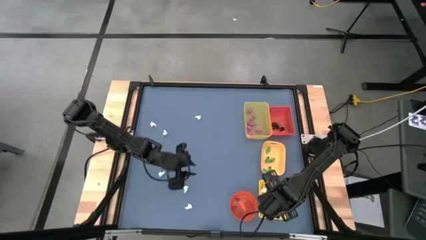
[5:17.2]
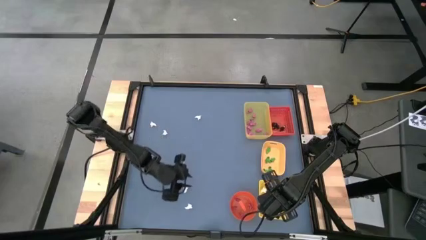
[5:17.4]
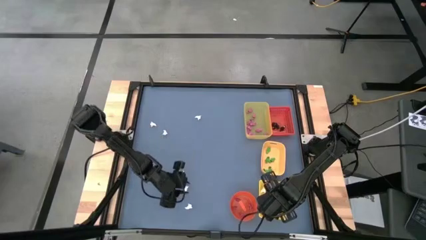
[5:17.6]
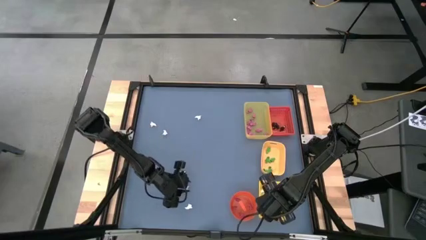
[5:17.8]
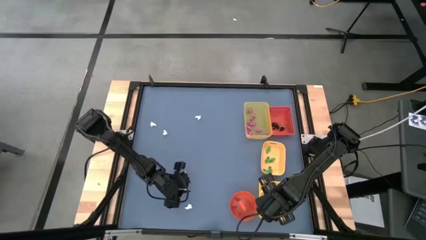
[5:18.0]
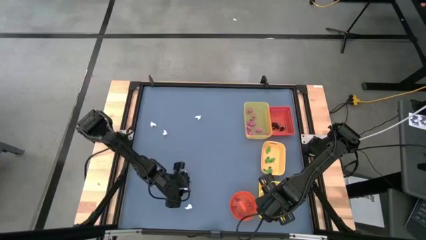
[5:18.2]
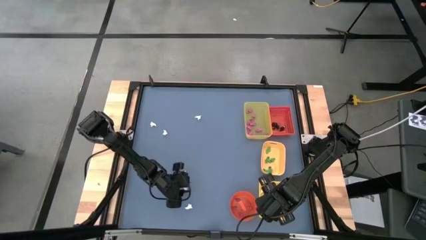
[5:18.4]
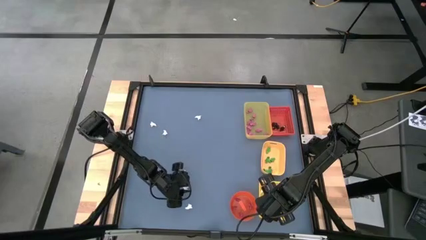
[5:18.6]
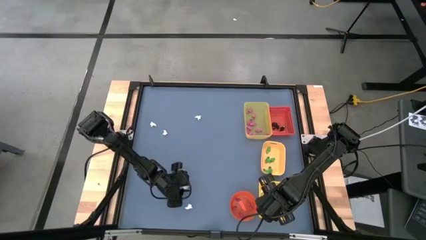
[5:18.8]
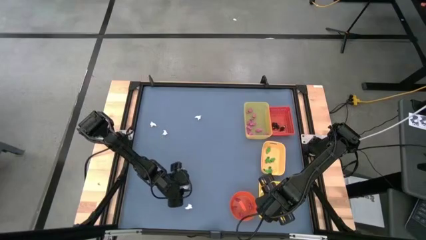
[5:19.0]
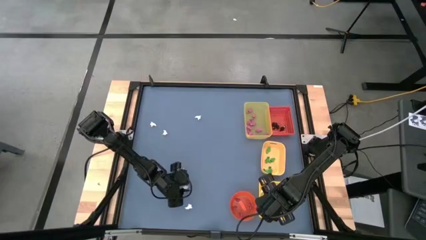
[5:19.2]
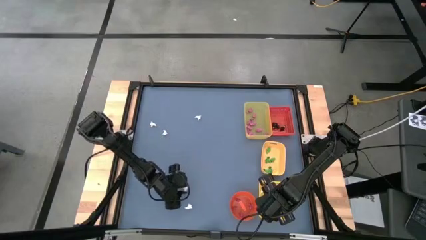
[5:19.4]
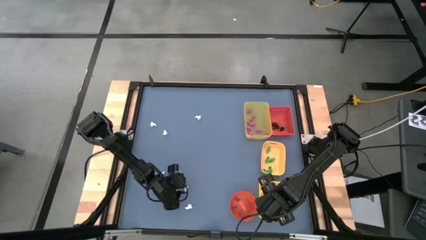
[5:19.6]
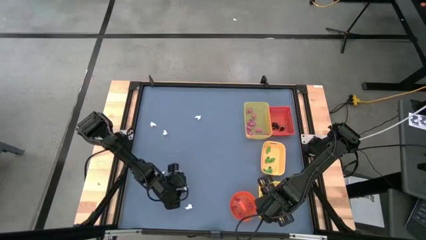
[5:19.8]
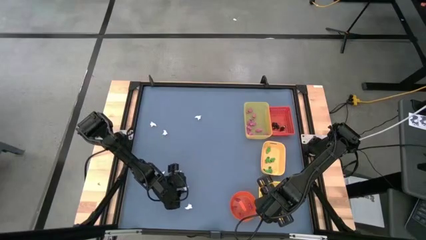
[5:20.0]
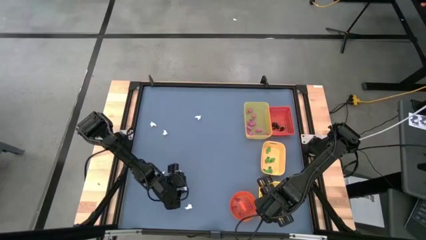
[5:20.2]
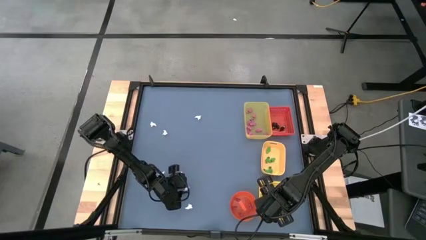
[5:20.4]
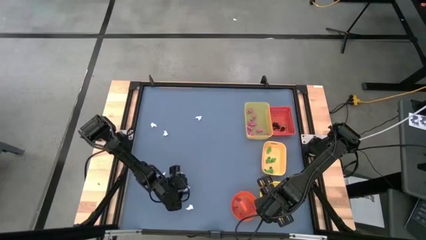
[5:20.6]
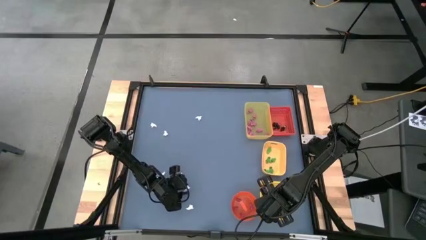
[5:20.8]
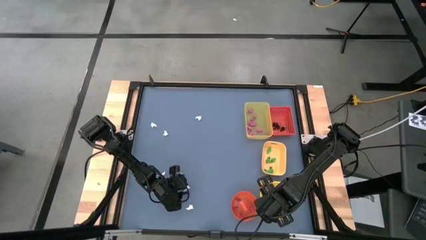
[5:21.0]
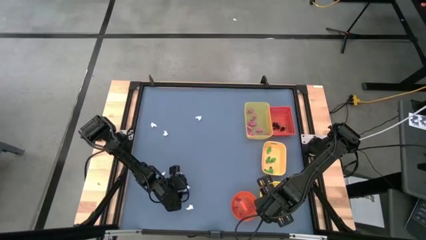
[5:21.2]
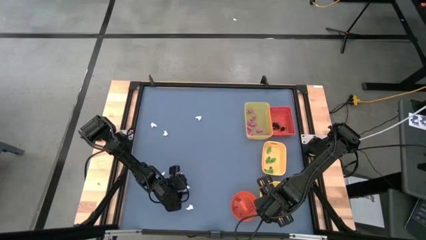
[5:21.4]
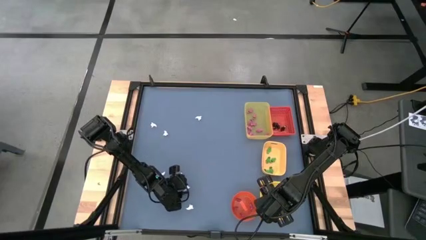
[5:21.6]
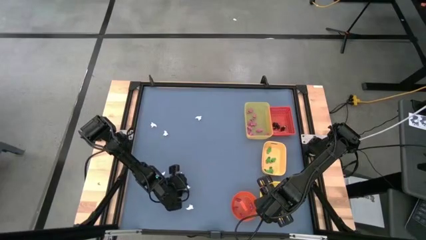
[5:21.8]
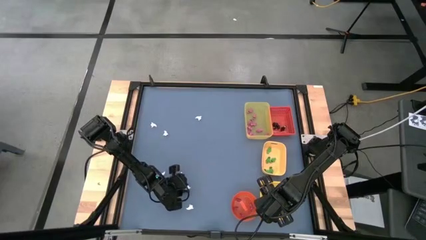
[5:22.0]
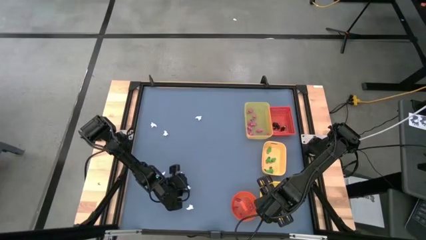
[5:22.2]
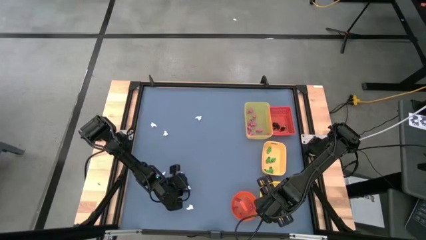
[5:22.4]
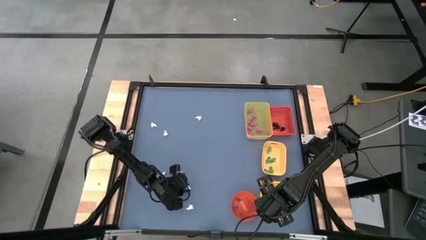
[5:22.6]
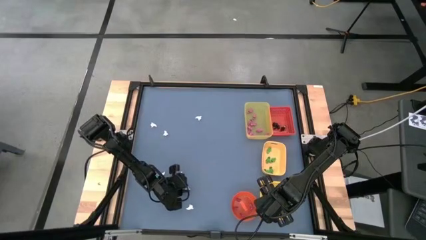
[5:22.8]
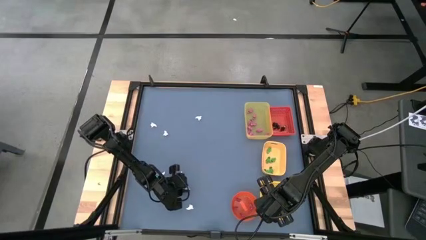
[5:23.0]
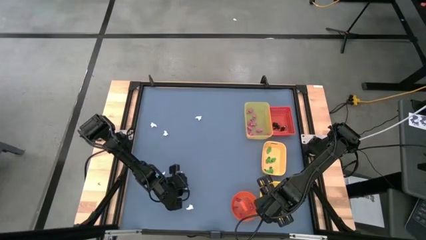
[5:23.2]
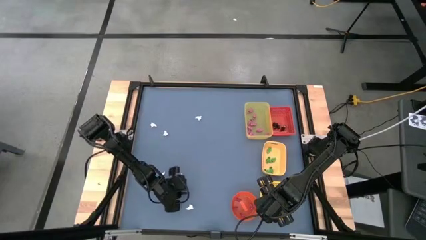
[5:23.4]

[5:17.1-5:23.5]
Task: Sort Halloween decoration
Put the white ghost toy into the bottom yellow bin

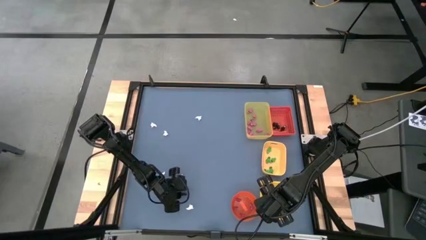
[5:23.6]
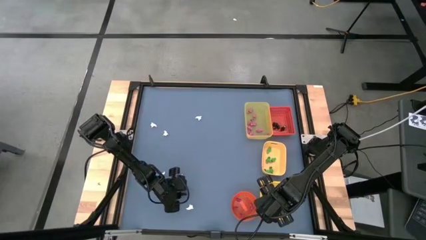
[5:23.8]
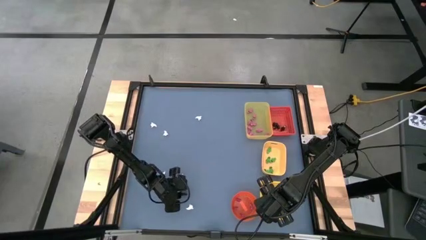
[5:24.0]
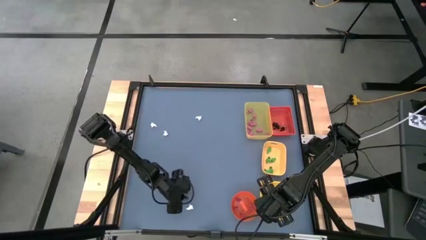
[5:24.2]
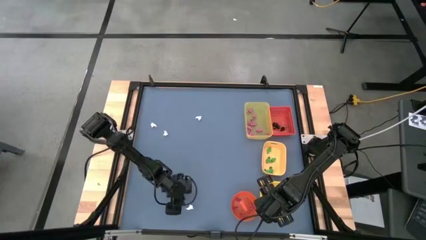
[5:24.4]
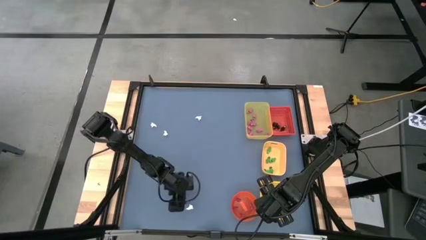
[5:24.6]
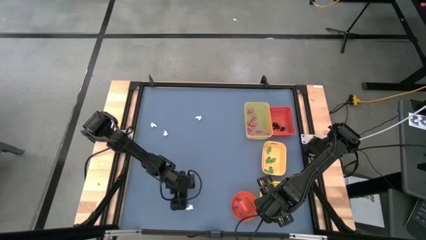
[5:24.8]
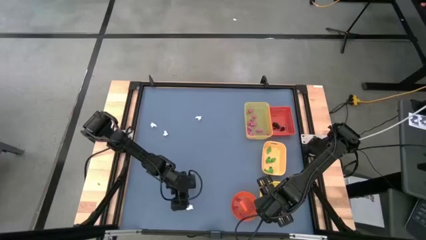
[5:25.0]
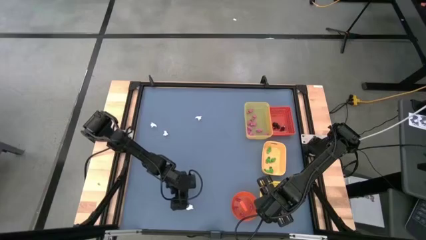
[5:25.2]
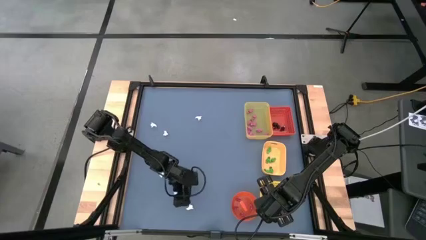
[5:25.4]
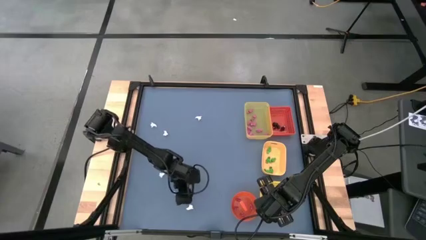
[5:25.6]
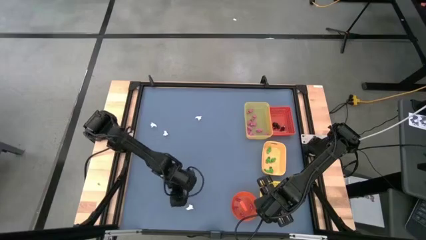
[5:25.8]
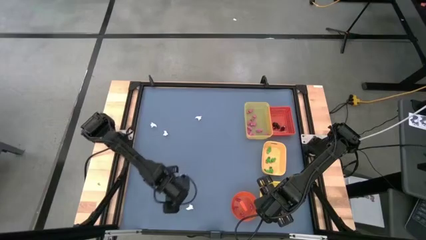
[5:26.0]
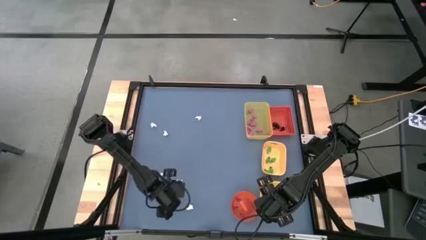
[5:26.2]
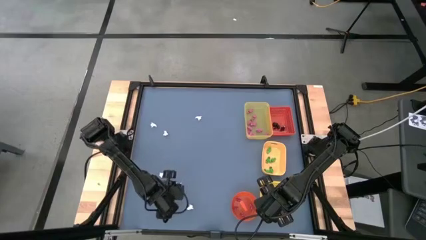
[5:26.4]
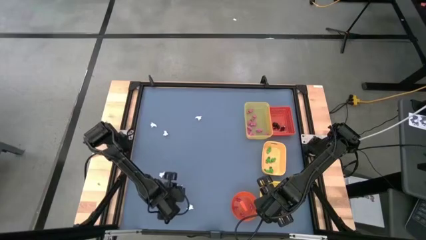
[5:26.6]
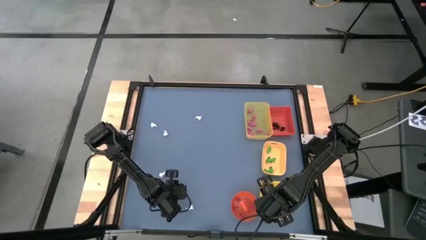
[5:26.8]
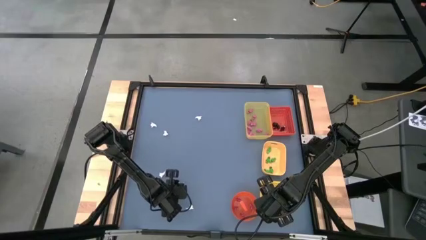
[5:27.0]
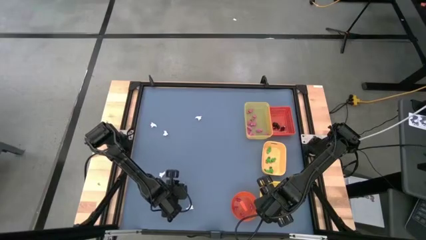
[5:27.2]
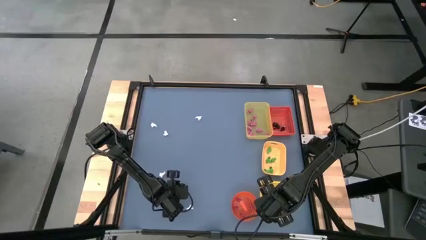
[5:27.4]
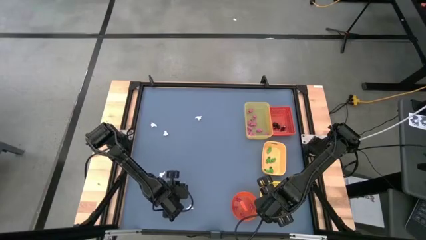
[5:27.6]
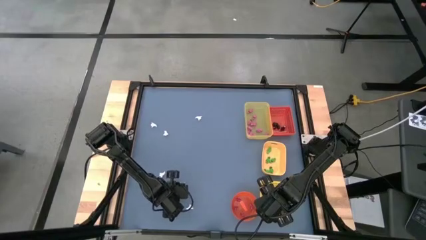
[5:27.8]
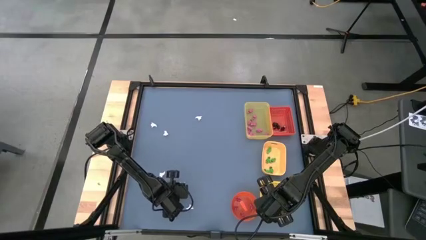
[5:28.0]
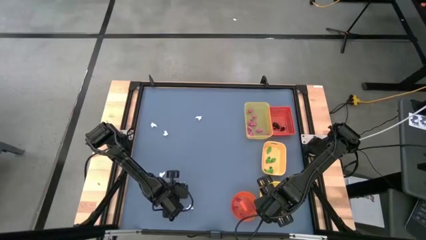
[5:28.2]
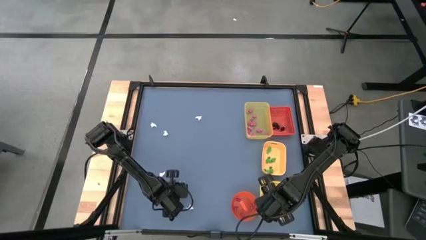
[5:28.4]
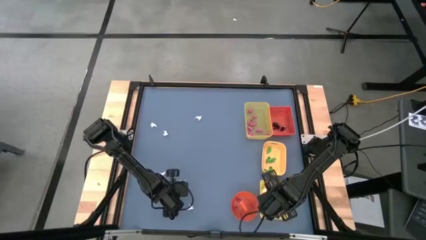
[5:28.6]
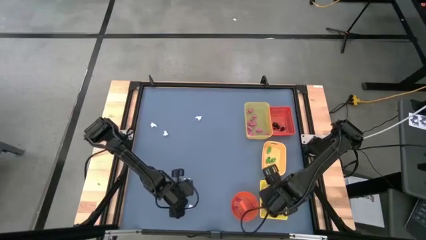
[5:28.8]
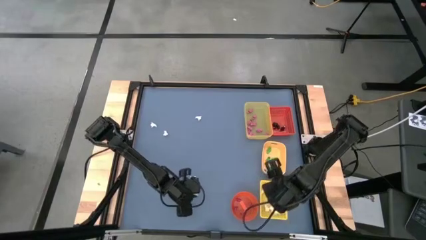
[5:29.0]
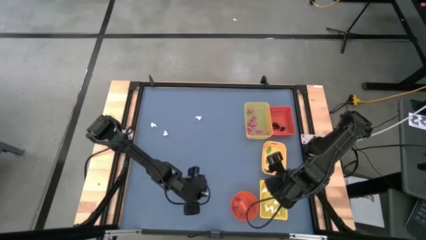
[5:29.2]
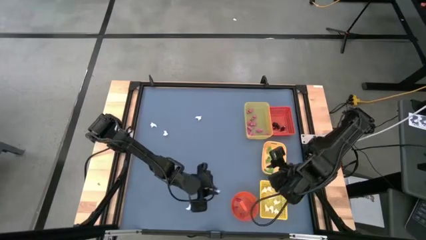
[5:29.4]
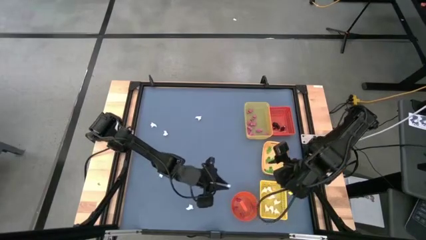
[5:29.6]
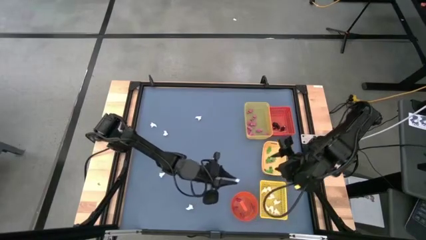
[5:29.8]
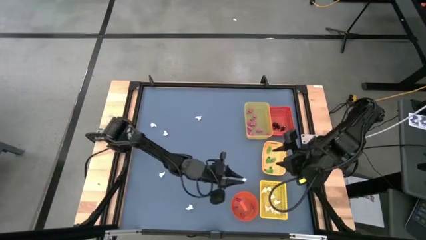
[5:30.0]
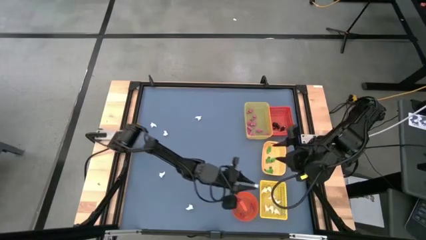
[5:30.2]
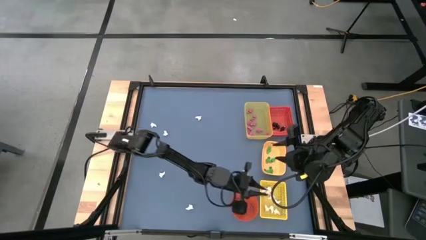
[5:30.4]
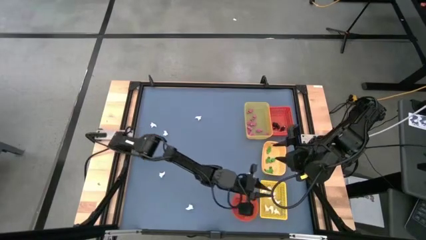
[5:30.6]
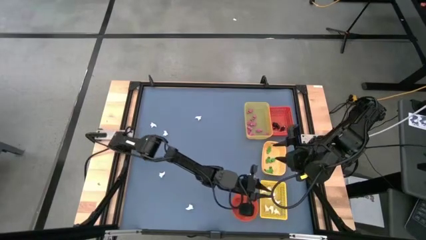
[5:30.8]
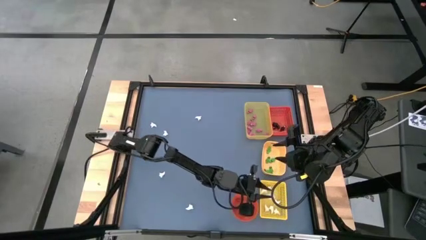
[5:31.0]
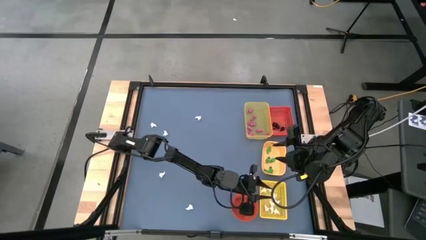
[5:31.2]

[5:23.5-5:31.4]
Put the white ghost toy into the yellow box
